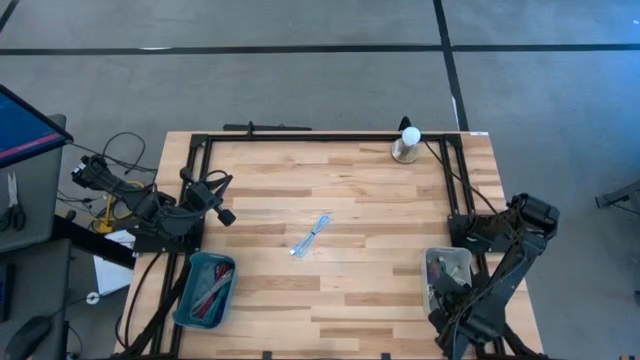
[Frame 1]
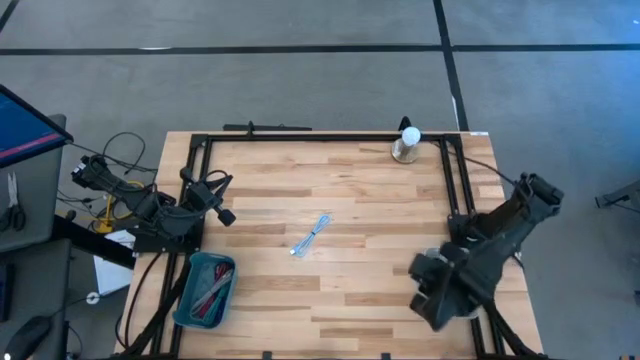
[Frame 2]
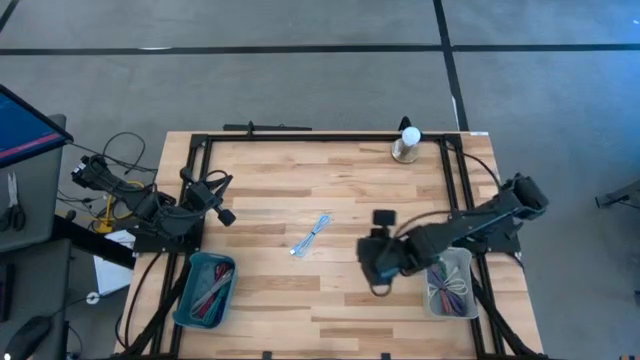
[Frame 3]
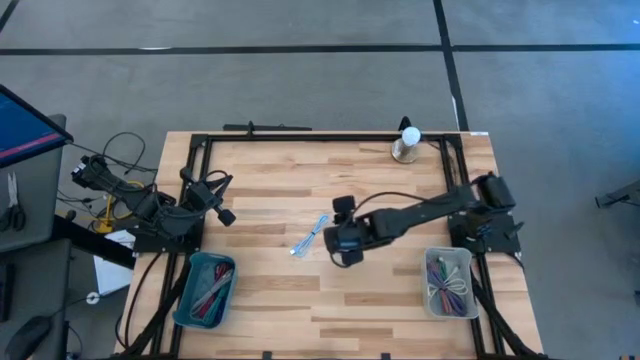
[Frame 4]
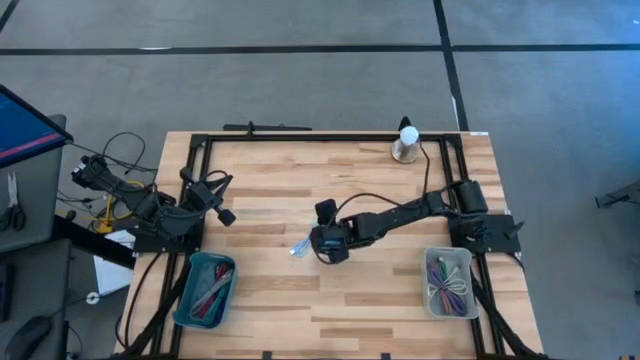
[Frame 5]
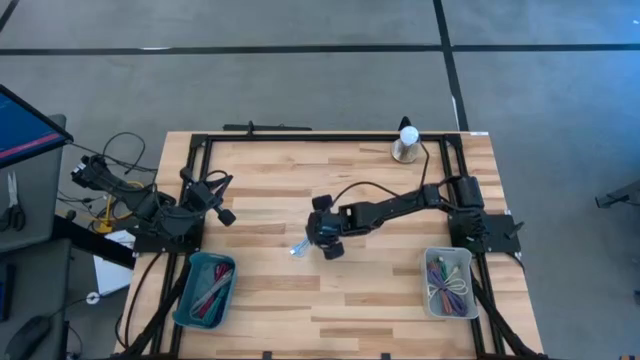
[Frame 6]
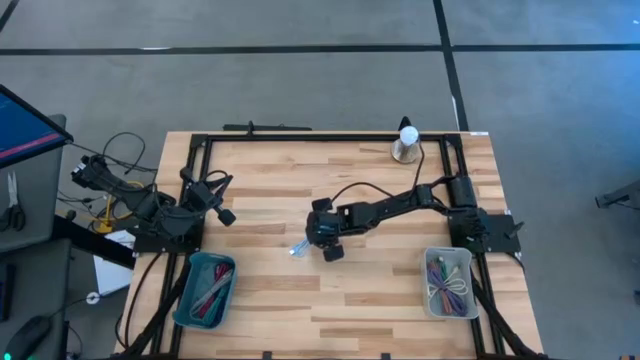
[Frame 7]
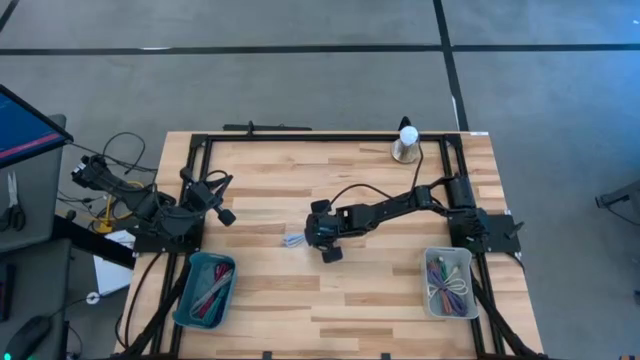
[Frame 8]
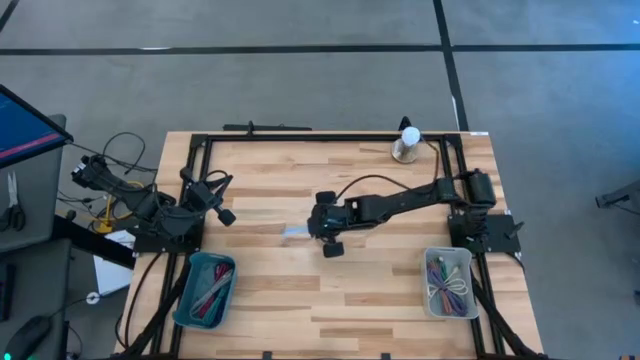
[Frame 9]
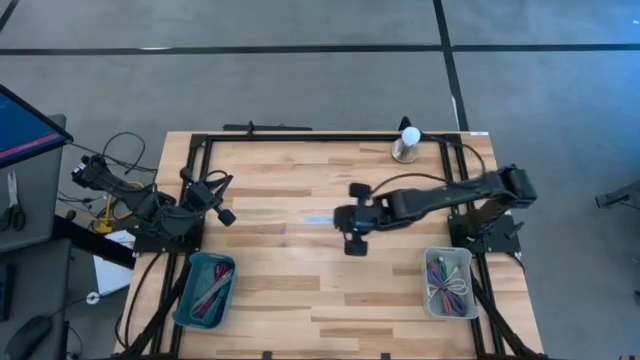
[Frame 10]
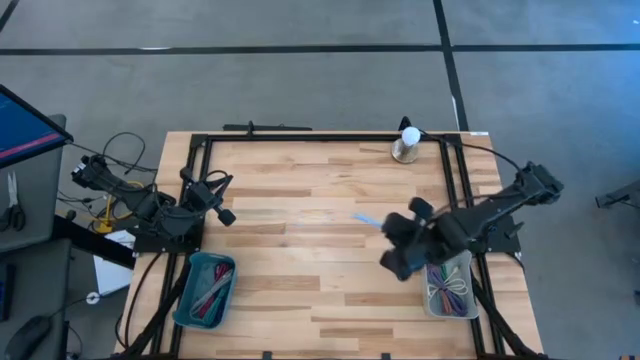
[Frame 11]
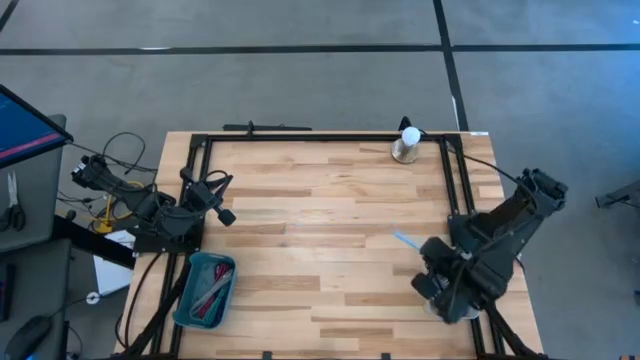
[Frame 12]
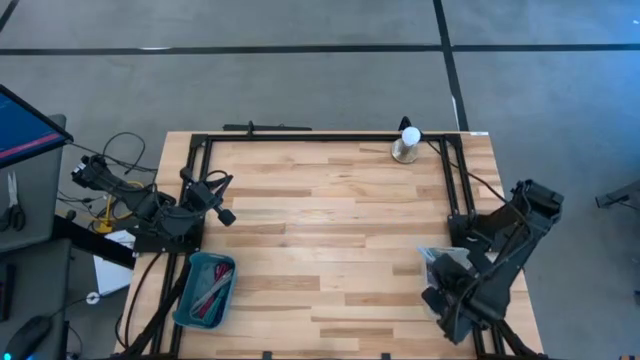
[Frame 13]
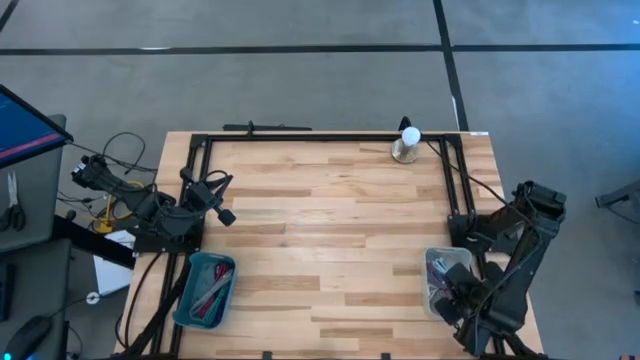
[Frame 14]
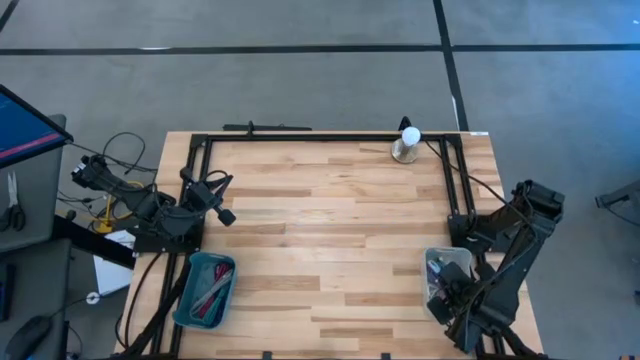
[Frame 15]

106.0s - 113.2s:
Task: Pick & Place USB Port
Put the light blue USB cable into the gray bin

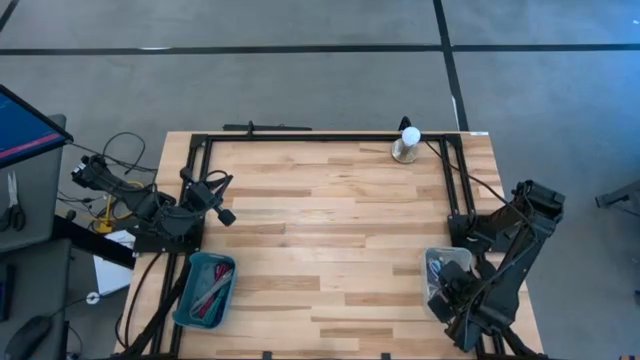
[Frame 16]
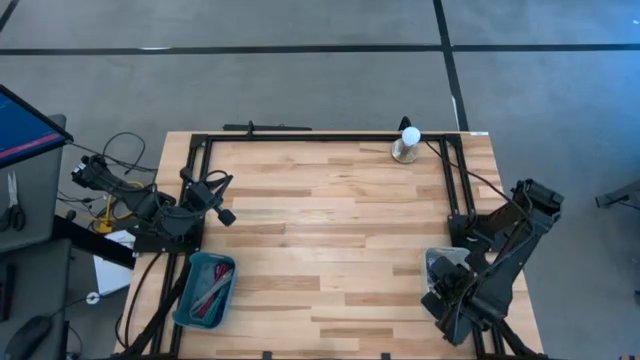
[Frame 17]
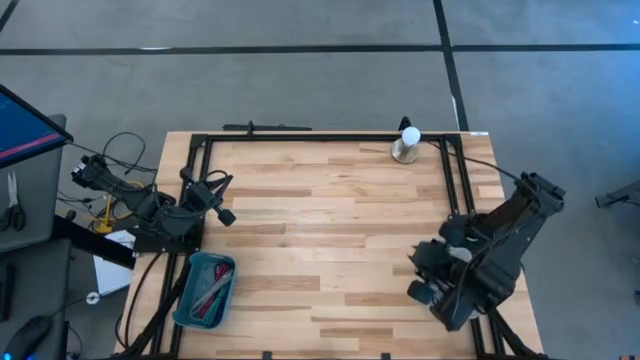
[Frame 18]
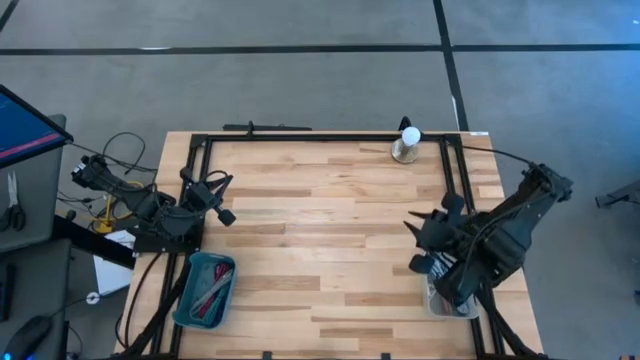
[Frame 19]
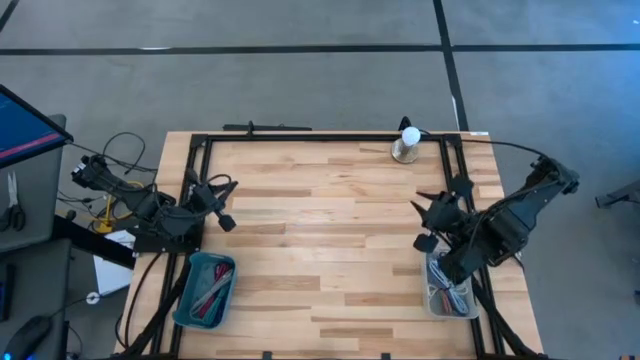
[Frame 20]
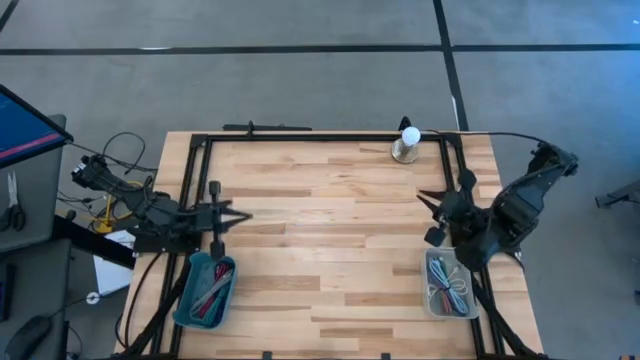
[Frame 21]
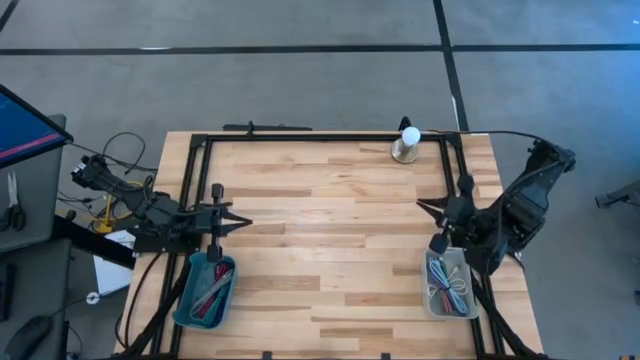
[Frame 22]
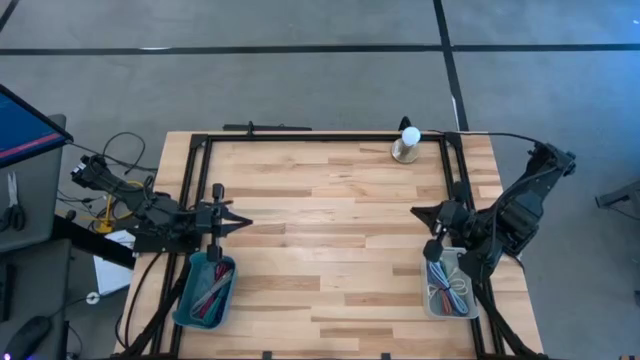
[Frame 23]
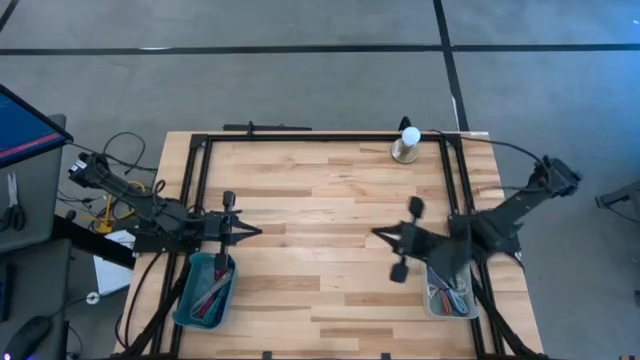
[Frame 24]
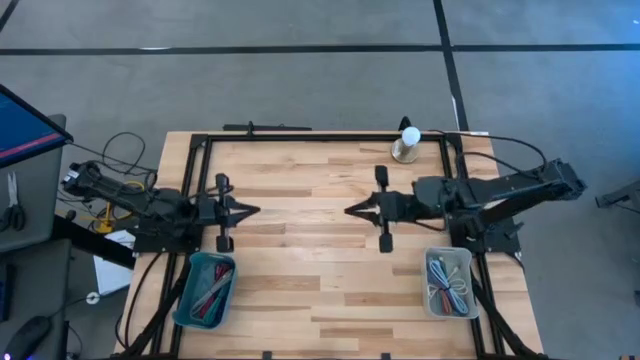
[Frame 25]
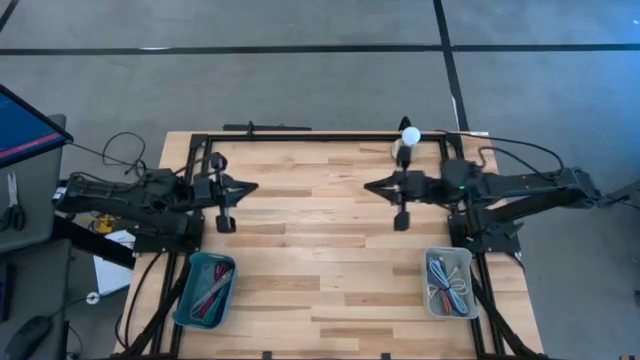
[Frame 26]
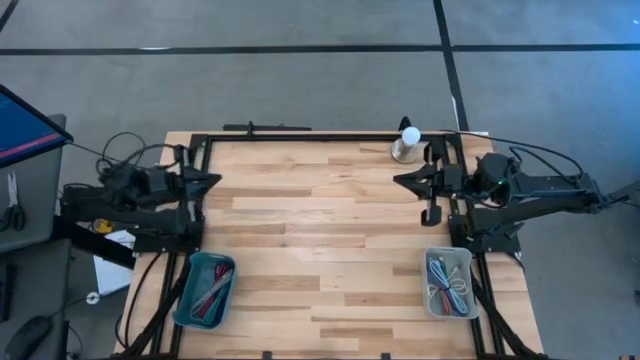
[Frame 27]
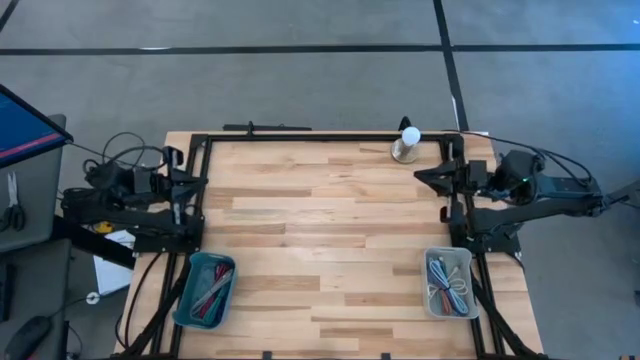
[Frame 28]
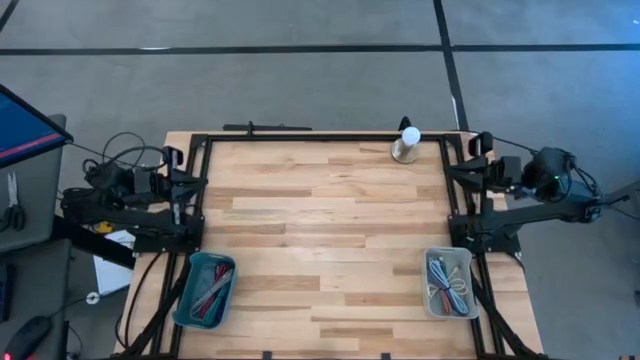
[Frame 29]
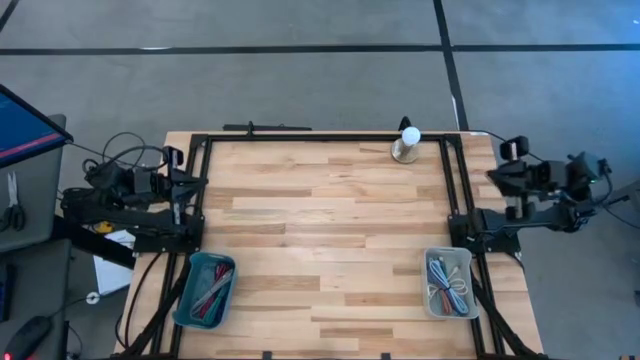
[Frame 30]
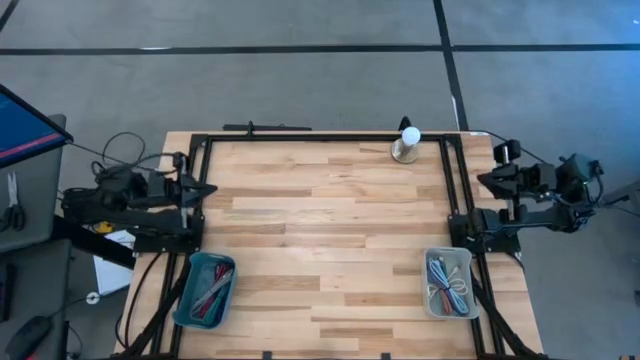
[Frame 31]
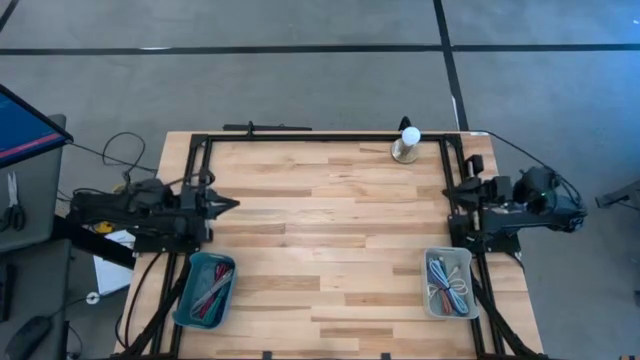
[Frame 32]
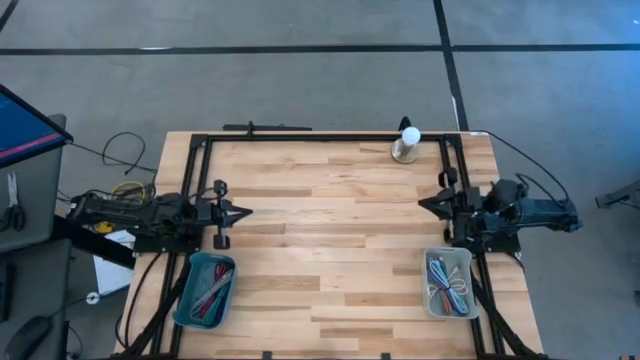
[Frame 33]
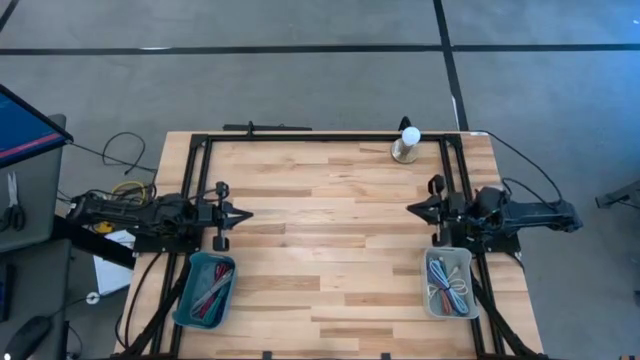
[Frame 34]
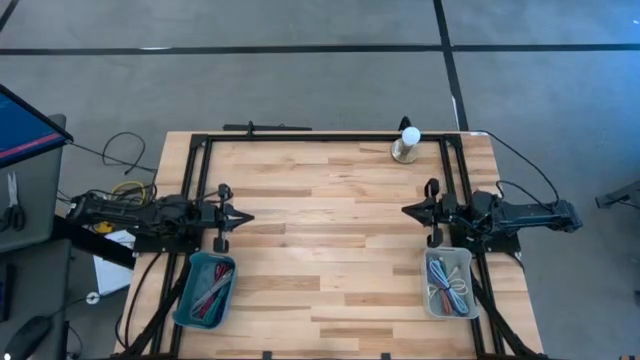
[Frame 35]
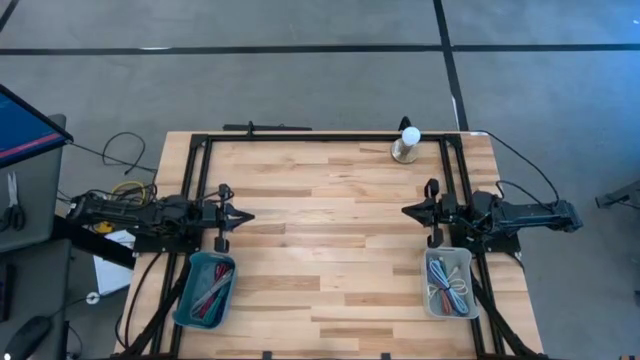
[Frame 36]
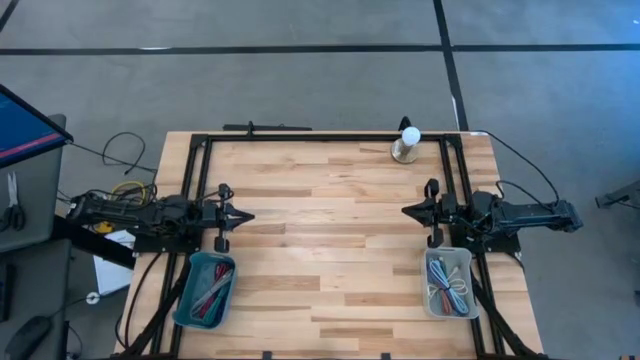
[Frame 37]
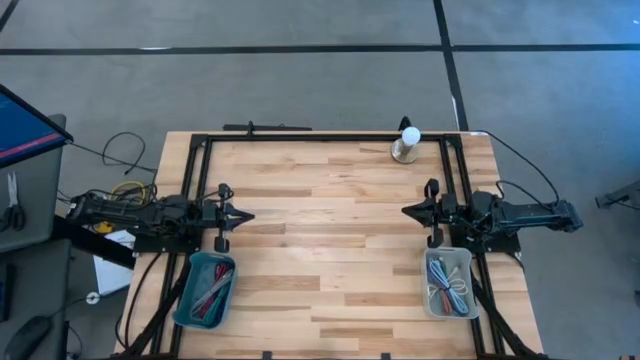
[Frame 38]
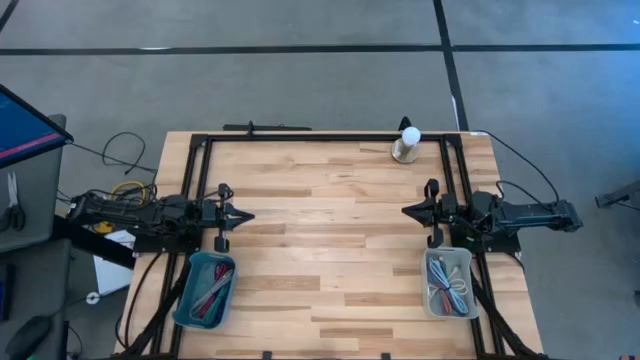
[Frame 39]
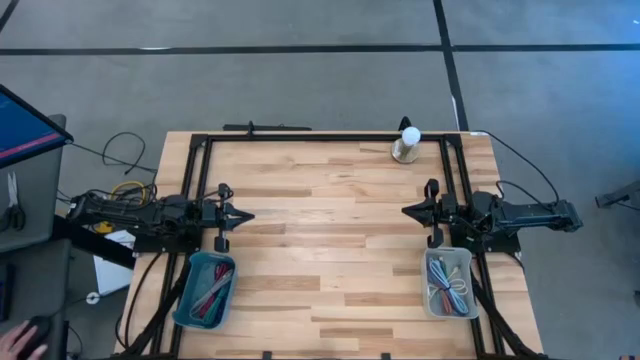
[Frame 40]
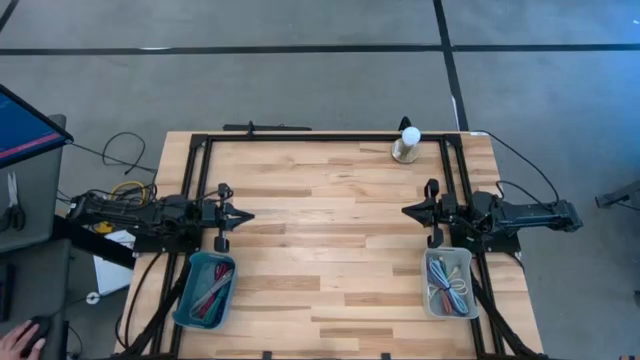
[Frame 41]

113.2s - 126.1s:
Return to Home Position

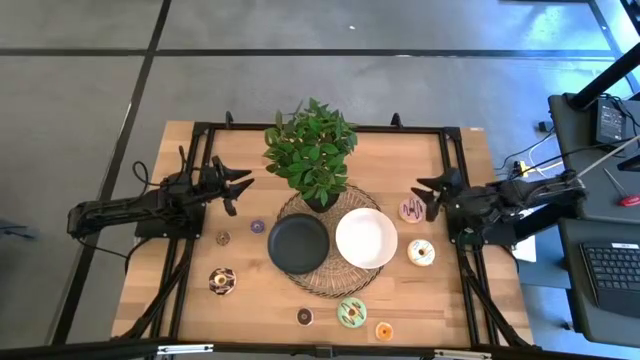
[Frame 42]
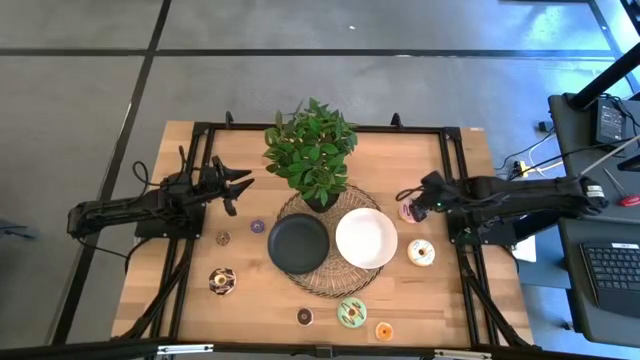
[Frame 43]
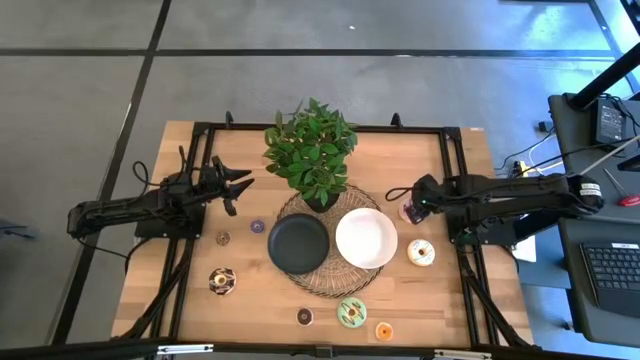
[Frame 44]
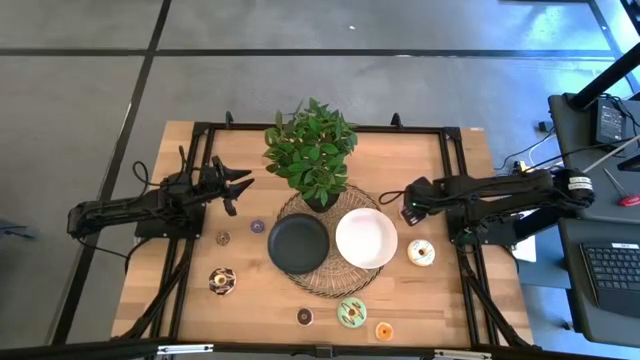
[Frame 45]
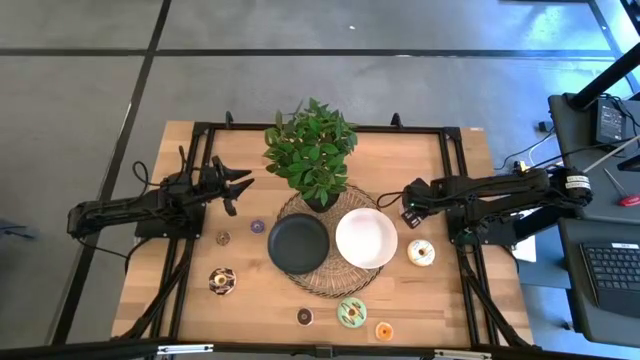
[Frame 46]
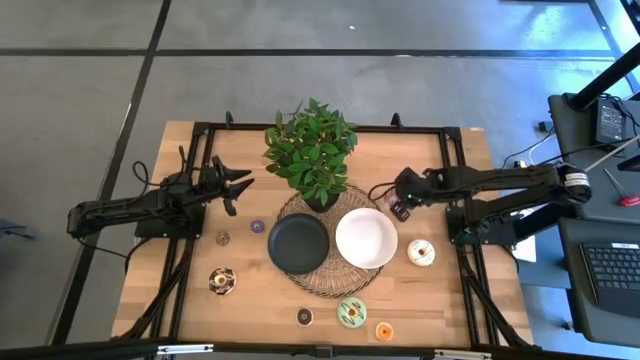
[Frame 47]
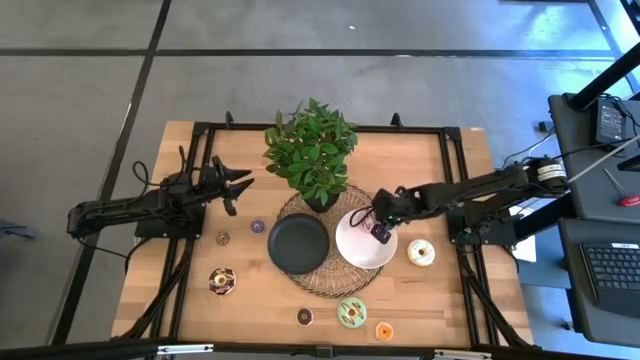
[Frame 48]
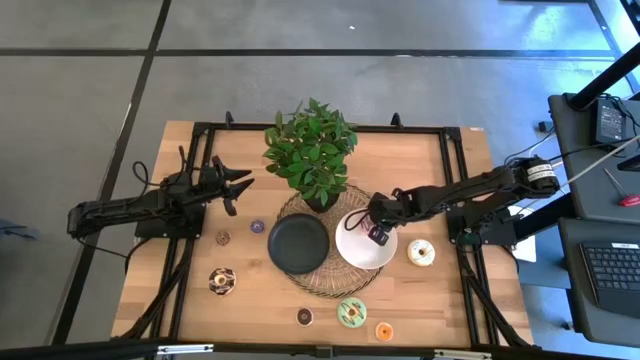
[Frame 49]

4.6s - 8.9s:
Task: Pick & Place donuts
Put the large purple donut on the white plate
